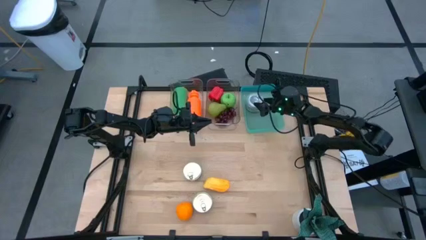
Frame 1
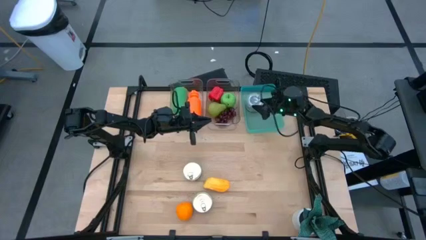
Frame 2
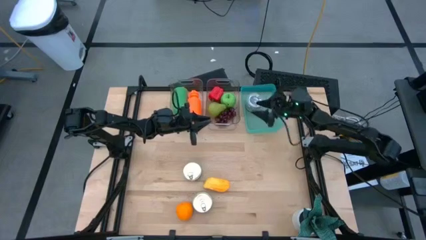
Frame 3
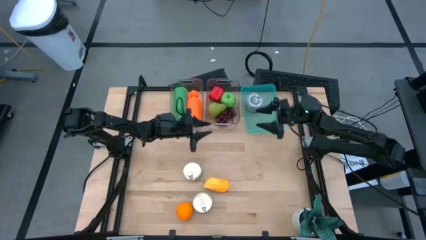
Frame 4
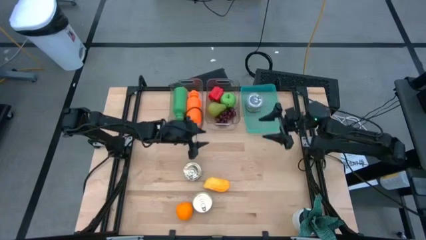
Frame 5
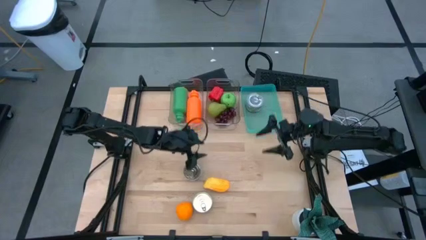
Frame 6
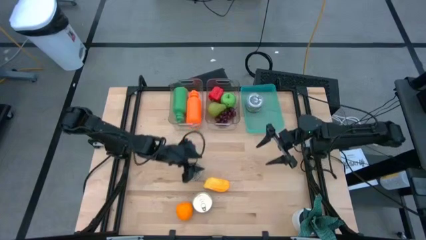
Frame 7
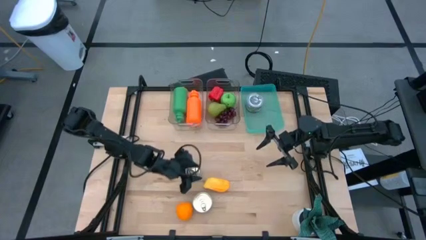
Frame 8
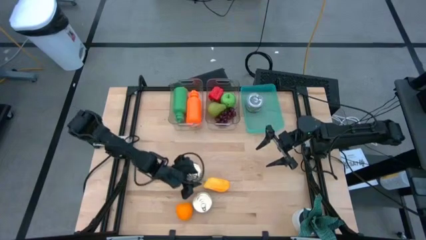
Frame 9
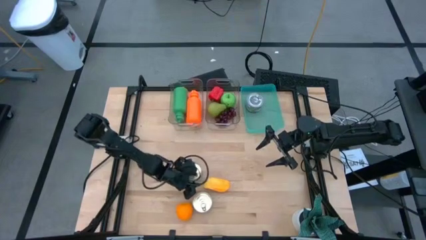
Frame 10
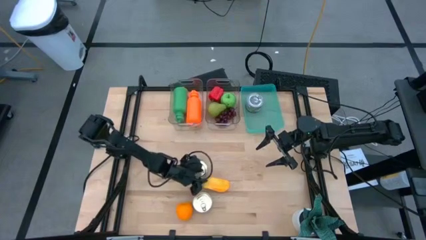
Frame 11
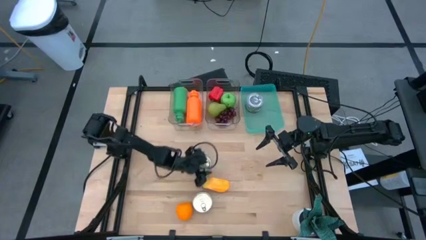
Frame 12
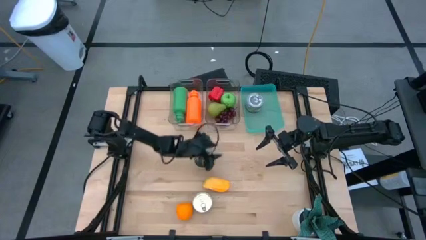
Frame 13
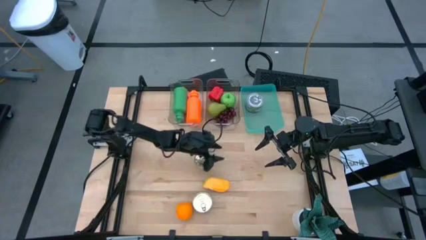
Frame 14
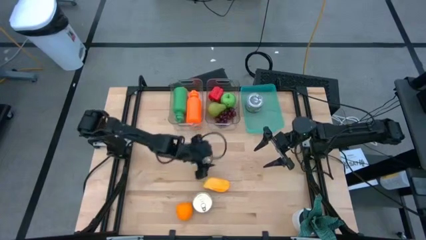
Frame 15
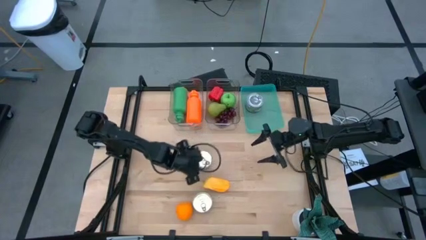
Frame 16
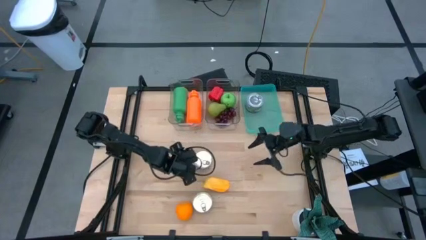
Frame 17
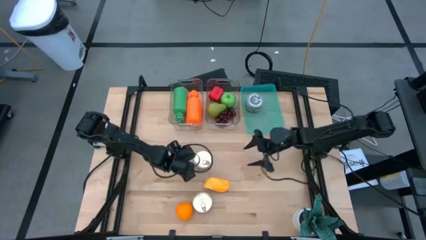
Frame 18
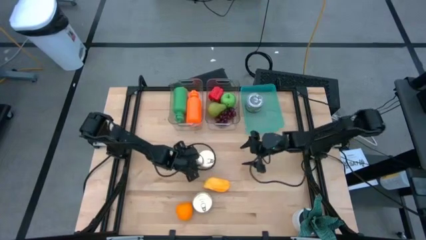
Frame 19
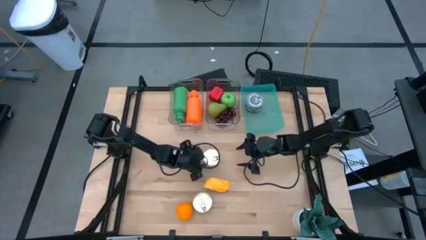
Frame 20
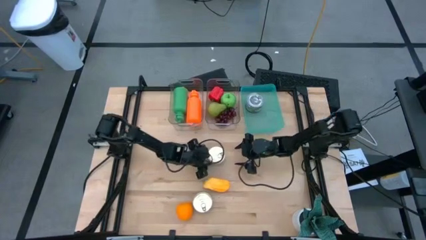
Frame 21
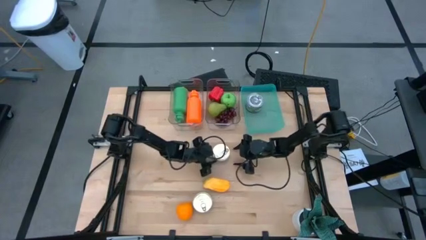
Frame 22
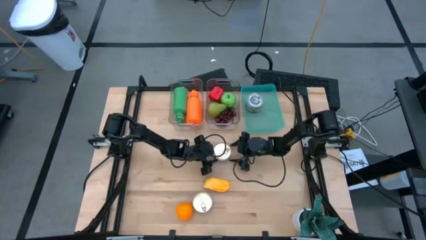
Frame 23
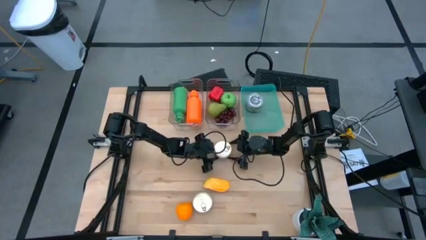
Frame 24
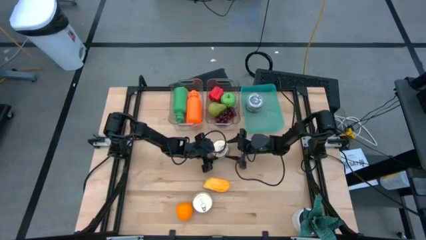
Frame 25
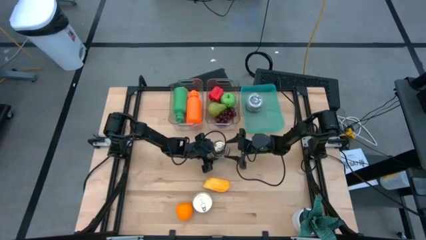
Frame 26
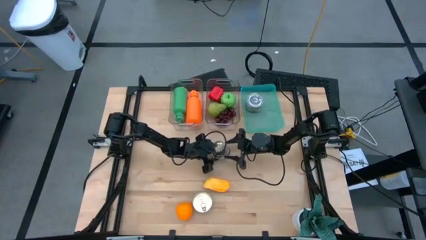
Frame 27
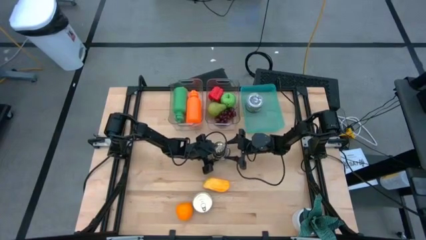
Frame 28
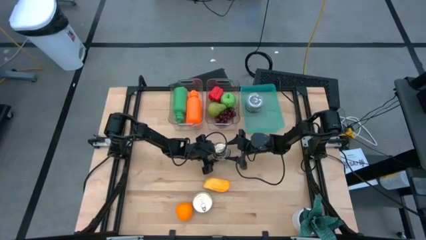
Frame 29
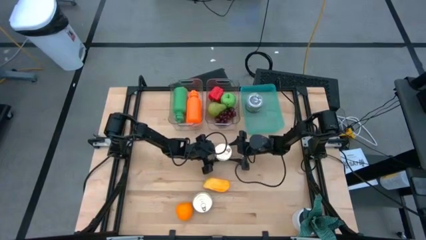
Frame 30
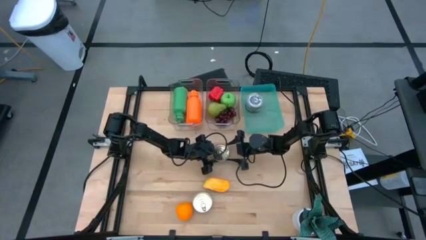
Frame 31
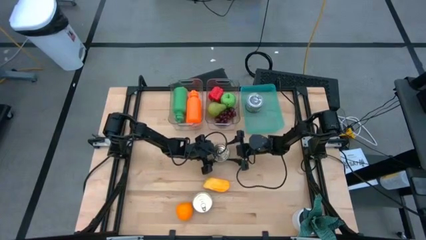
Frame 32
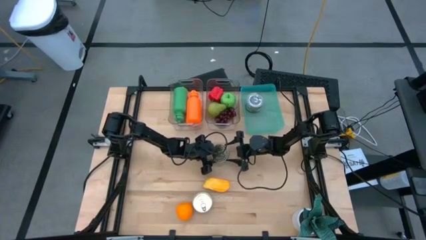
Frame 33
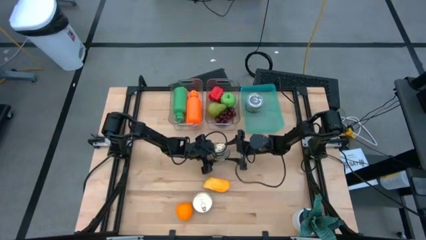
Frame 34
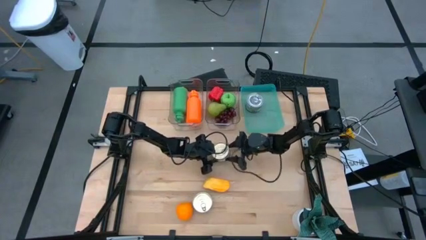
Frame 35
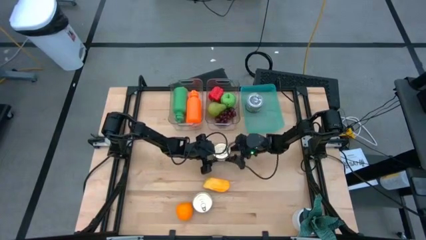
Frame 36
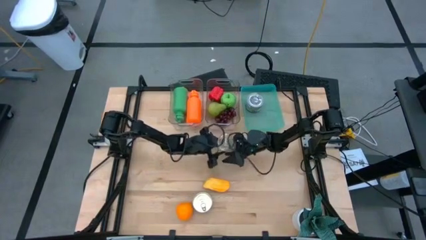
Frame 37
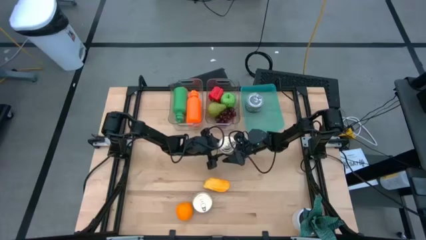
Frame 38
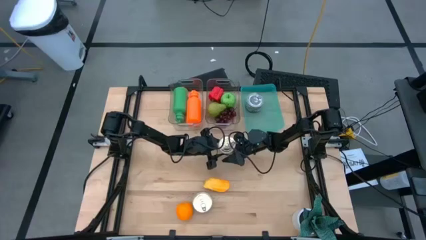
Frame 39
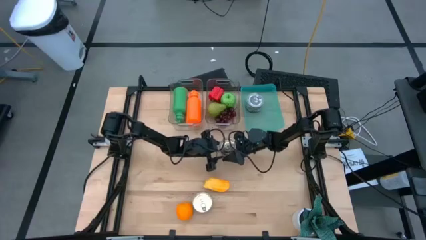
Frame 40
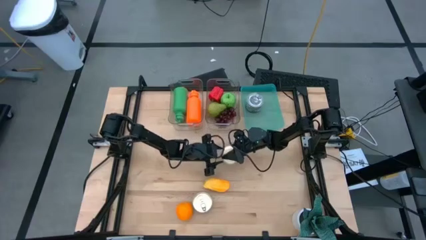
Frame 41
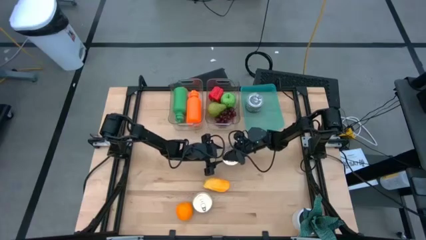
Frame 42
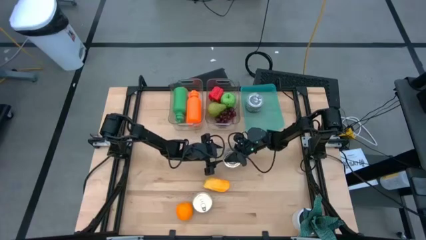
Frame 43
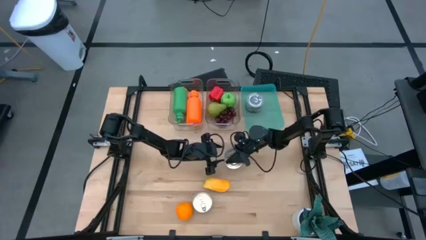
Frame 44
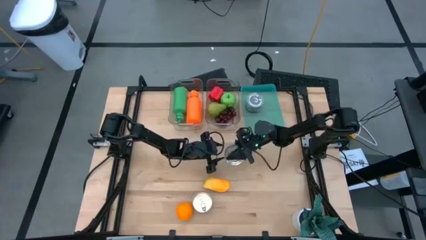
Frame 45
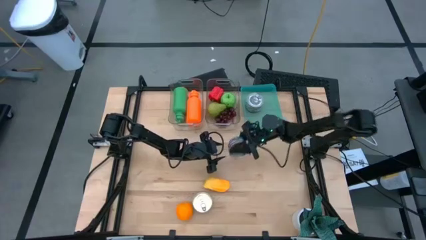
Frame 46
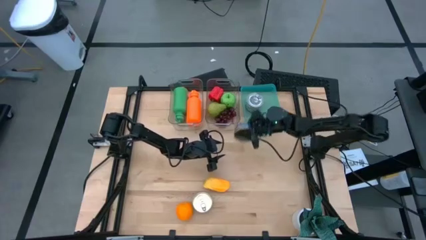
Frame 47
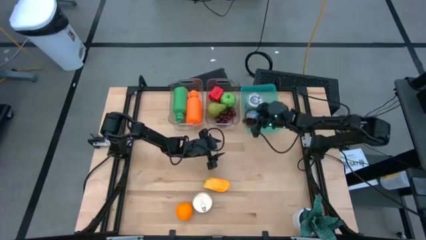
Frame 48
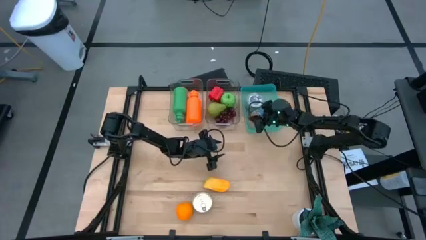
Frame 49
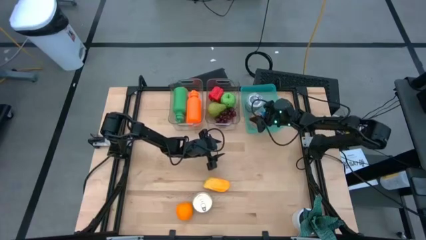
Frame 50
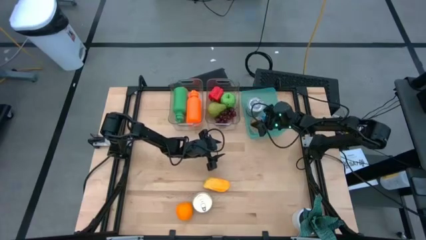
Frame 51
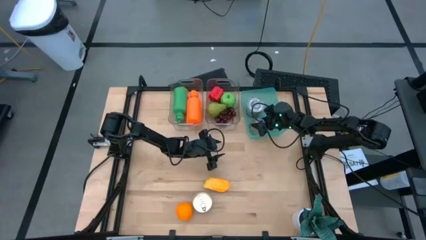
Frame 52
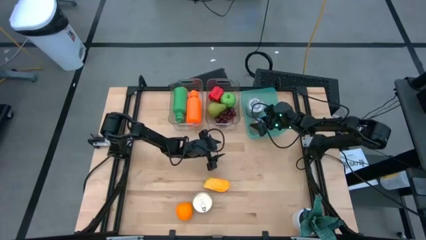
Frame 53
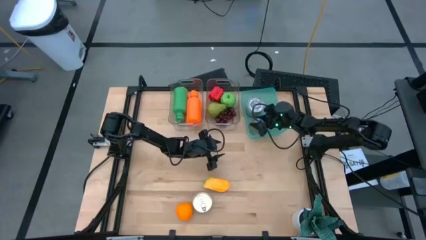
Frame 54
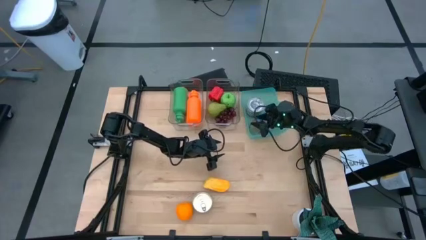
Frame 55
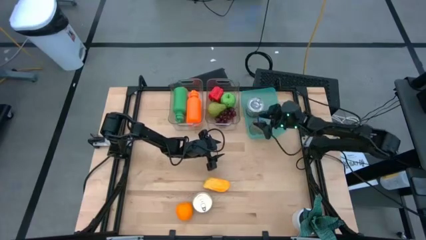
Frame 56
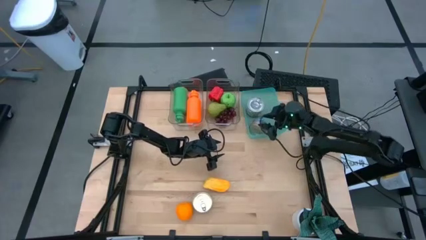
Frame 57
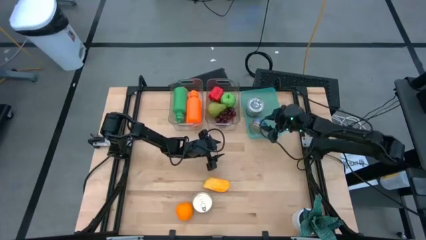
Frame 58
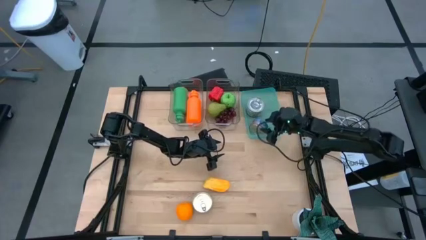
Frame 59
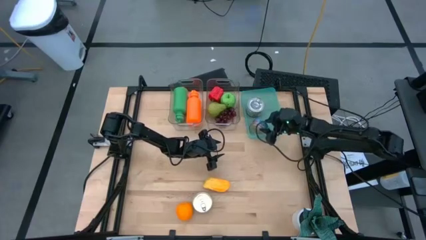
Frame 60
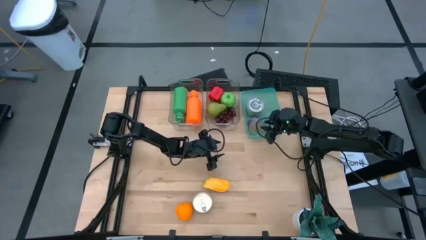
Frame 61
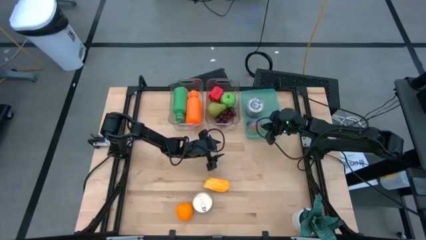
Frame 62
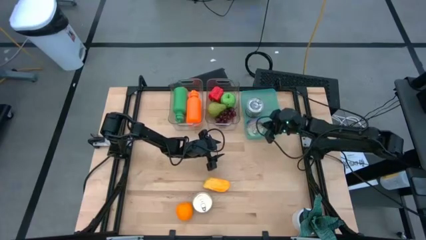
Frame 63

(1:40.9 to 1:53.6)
Task: Pick & Place Food Item
Put the top blue tuna can into the green bin
